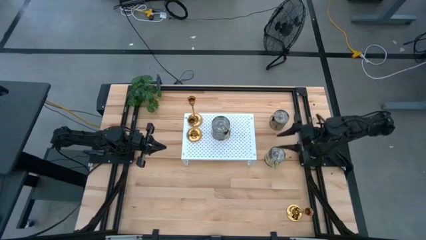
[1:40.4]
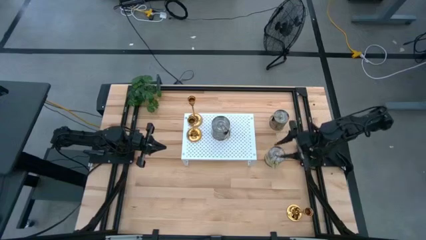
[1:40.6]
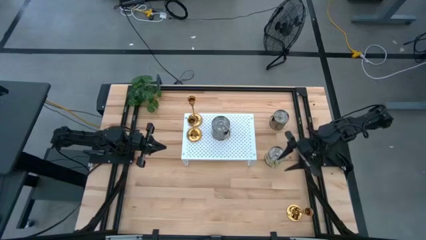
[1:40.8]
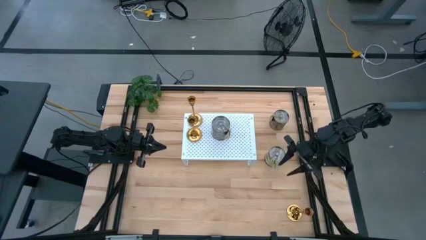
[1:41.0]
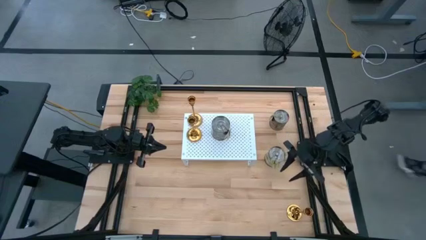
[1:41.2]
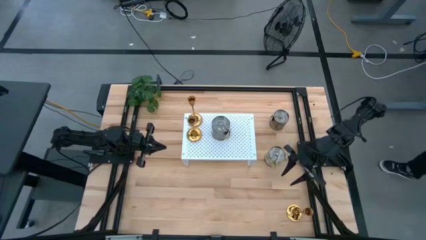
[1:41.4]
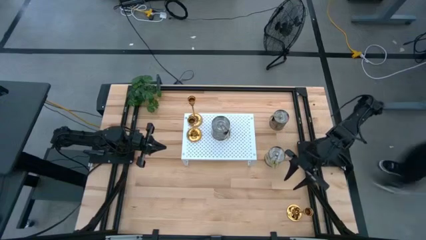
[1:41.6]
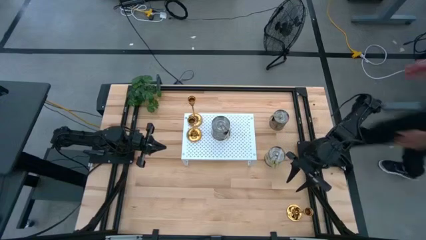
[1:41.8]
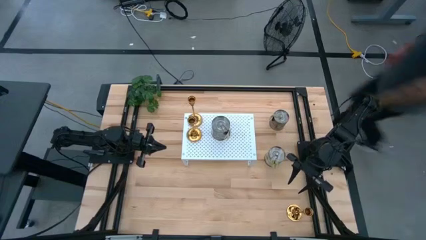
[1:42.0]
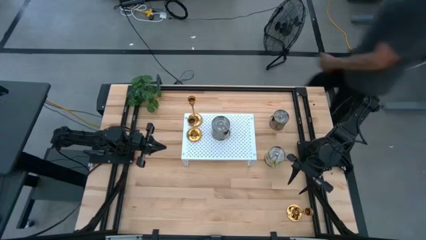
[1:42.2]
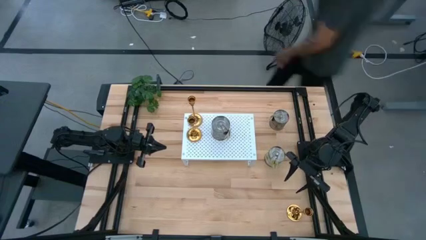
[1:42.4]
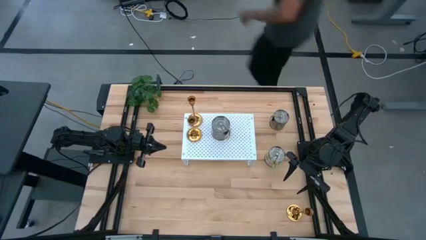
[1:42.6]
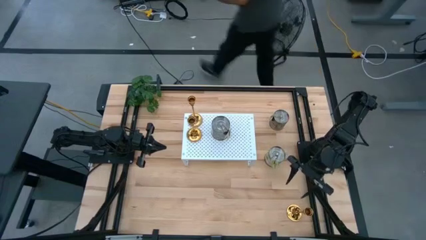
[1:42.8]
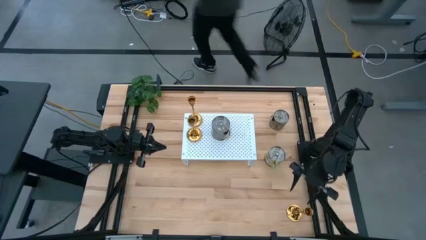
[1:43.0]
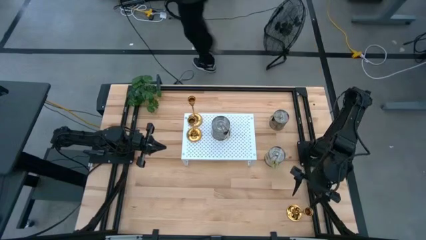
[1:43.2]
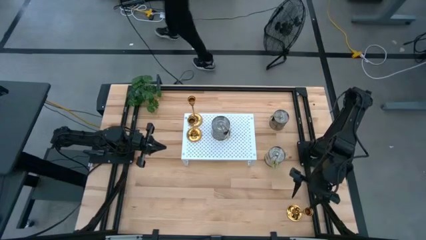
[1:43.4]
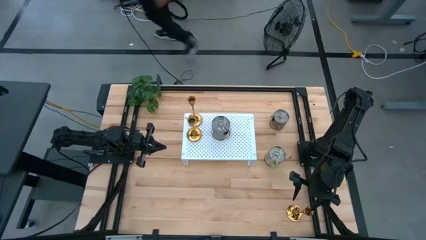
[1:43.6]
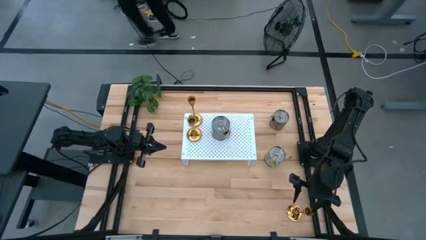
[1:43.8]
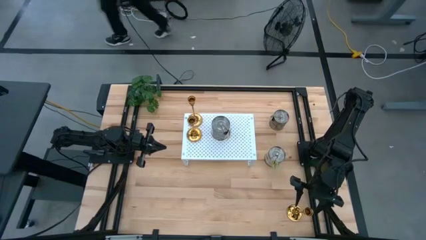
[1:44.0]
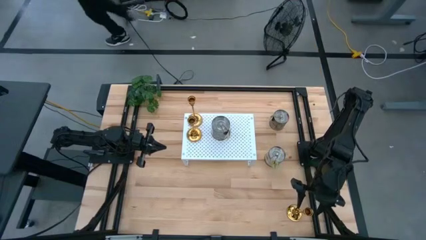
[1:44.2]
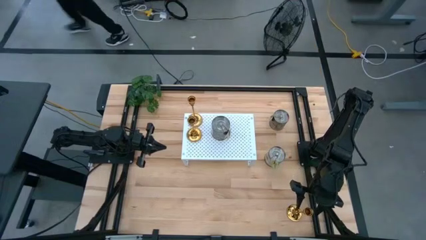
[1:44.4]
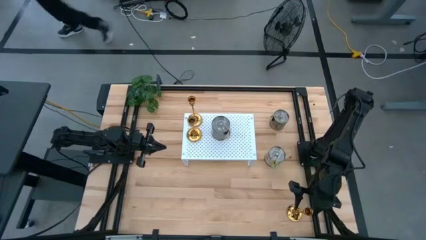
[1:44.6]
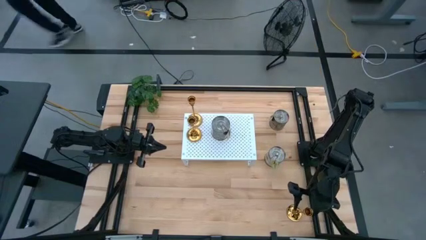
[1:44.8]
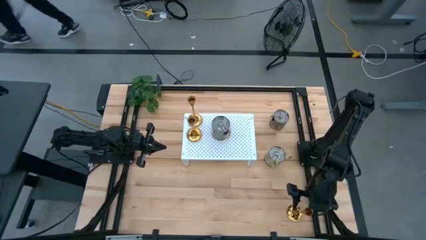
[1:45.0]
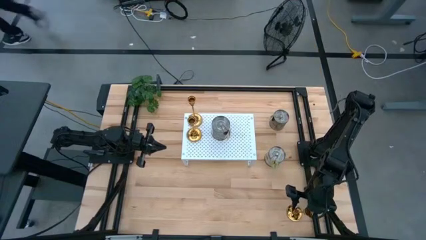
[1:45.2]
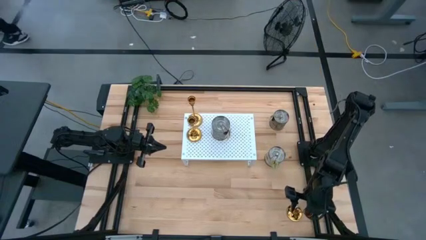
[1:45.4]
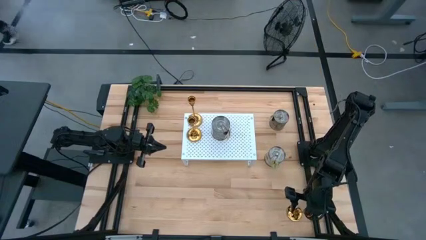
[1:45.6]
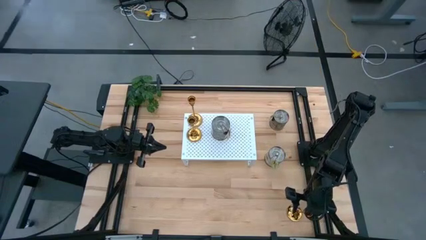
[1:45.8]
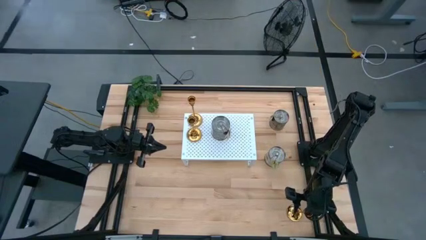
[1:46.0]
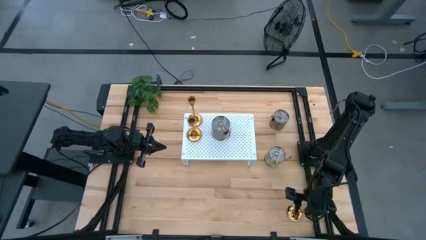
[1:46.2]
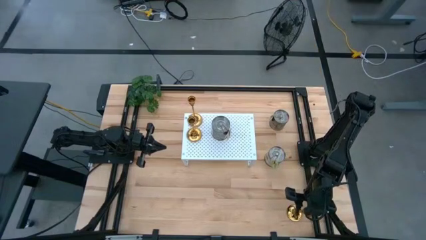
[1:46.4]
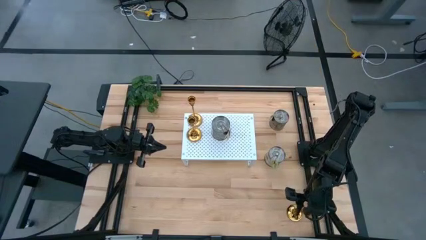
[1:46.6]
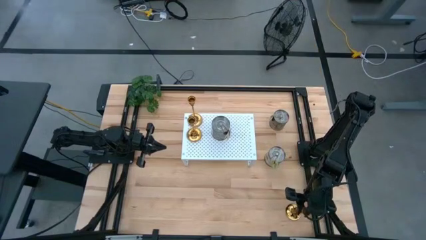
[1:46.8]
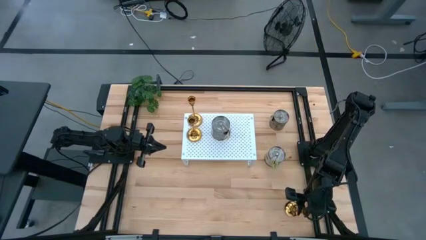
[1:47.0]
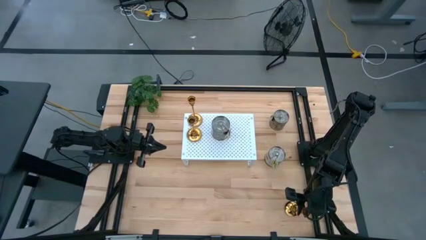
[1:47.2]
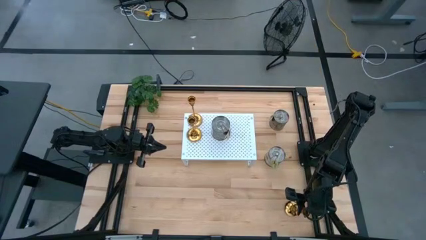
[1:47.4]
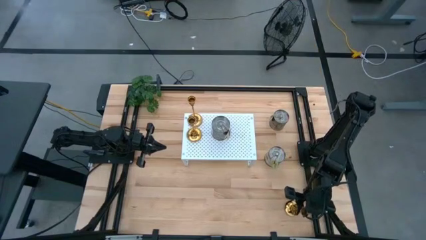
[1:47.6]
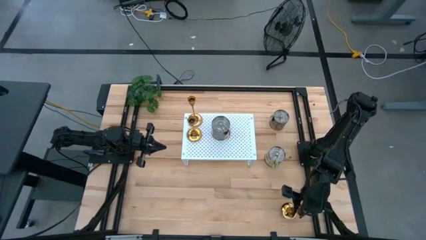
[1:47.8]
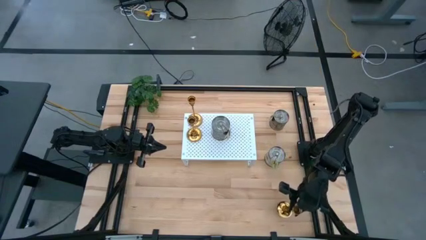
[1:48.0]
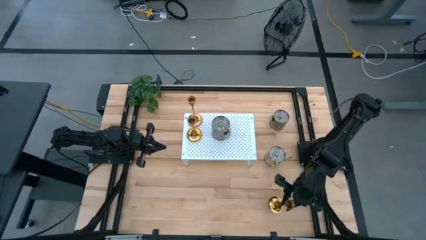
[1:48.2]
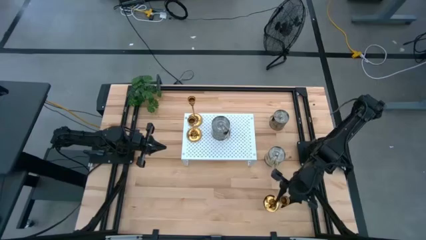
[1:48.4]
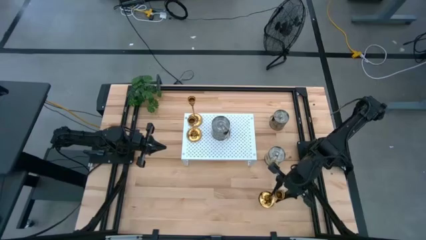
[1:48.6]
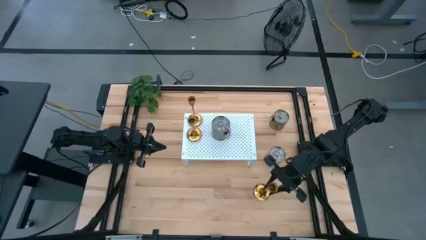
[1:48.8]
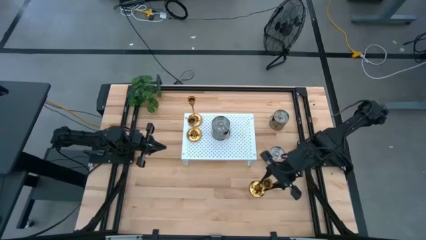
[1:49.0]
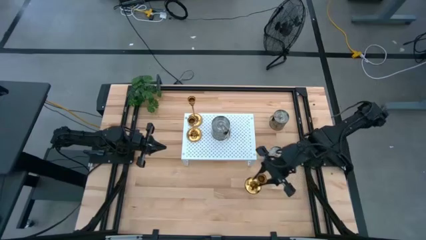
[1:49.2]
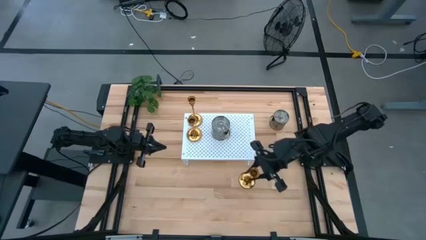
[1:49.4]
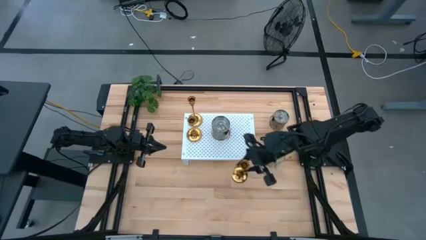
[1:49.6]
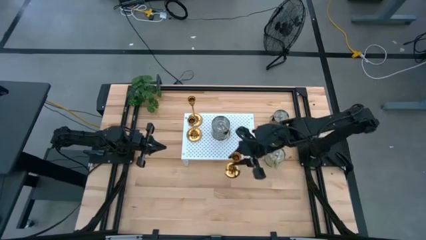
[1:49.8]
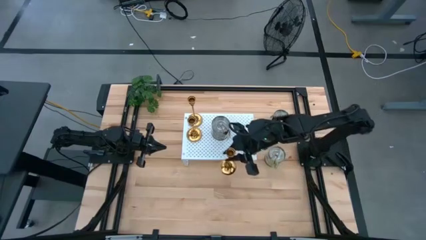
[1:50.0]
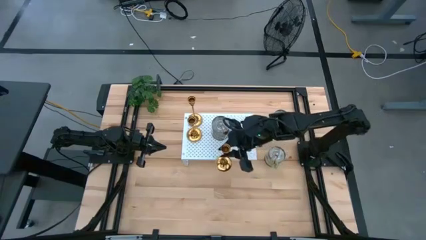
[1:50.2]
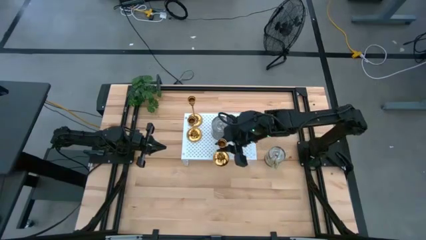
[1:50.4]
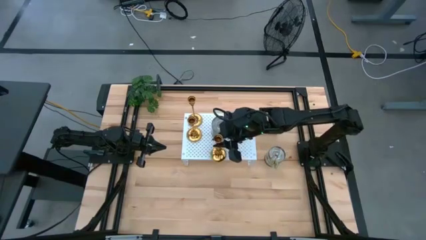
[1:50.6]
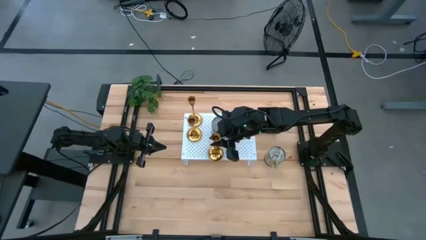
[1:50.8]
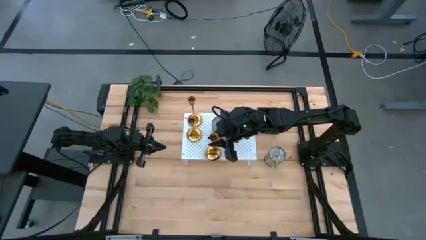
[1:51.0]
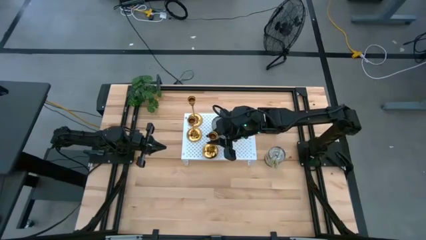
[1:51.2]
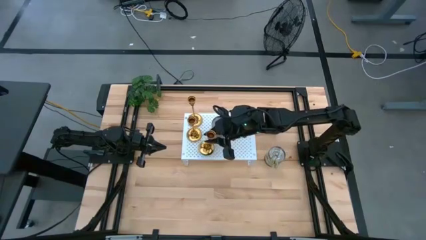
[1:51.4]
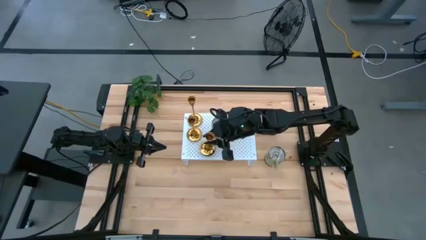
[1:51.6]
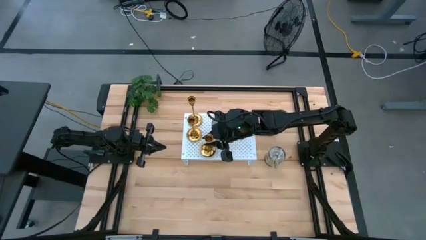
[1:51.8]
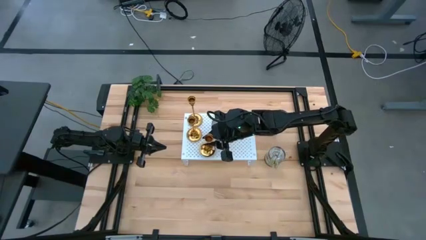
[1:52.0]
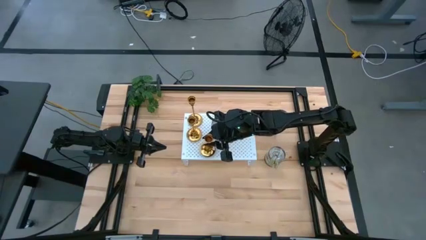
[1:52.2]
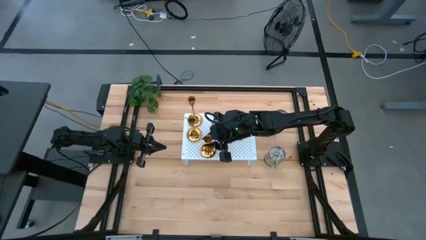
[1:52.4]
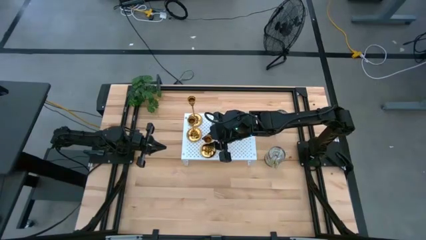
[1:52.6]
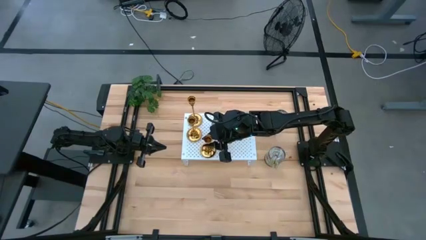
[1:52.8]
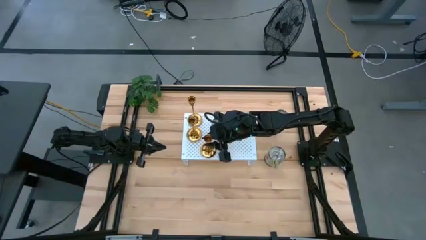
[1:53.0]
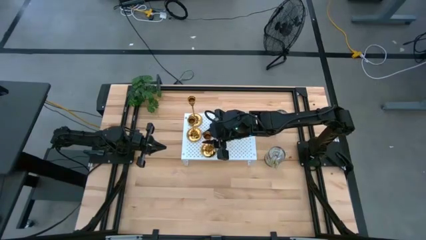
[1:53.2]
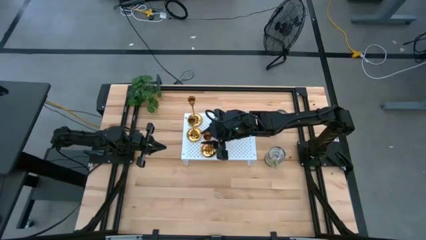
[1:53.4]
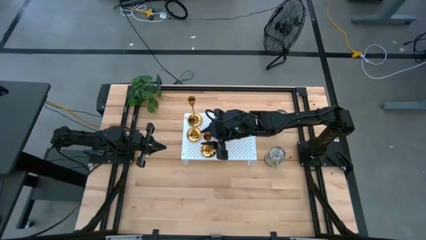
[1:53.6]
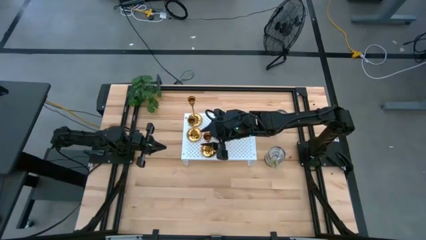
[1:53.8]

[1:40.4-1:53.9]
Task: Pick & Place candle stick holders
Put the golden candle holder on the shelf

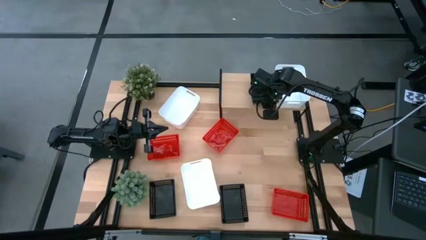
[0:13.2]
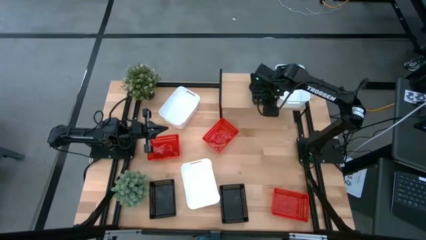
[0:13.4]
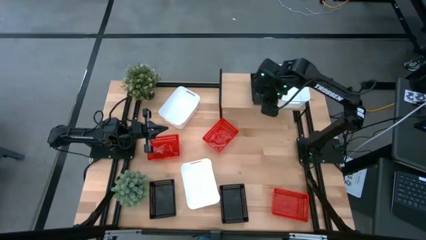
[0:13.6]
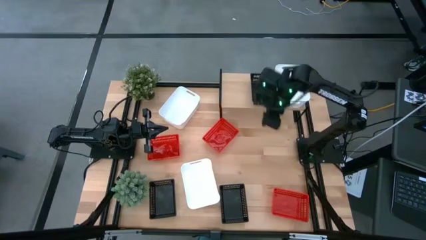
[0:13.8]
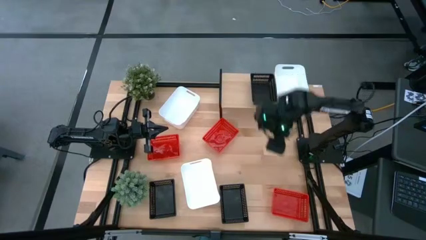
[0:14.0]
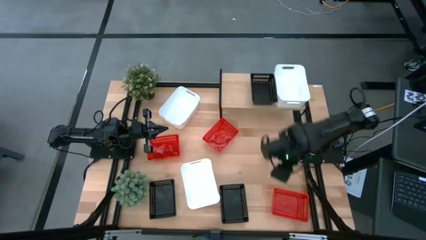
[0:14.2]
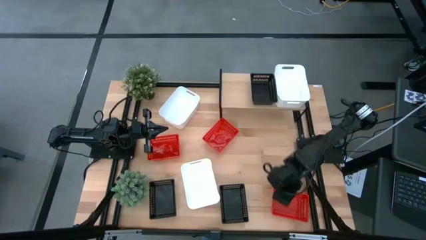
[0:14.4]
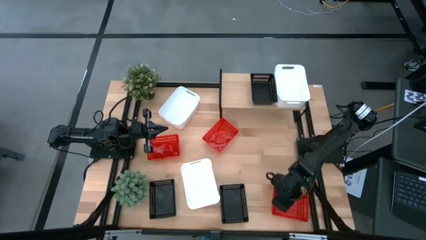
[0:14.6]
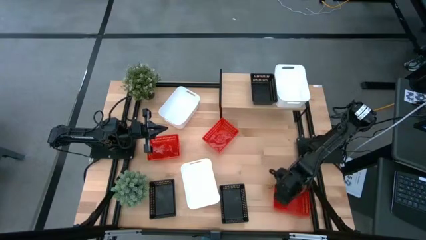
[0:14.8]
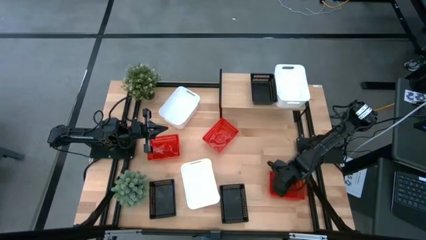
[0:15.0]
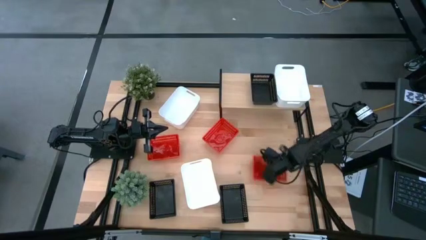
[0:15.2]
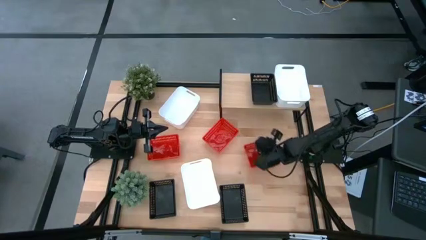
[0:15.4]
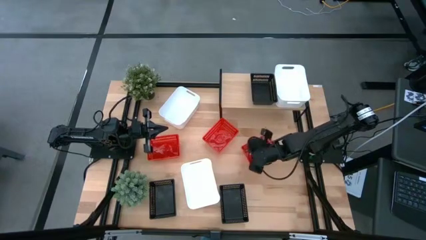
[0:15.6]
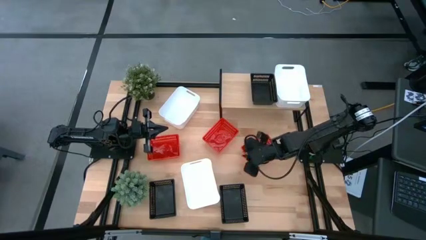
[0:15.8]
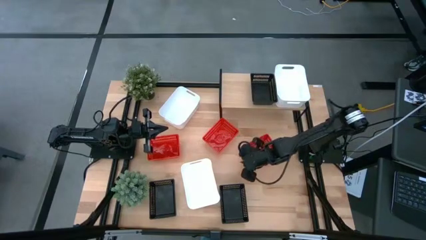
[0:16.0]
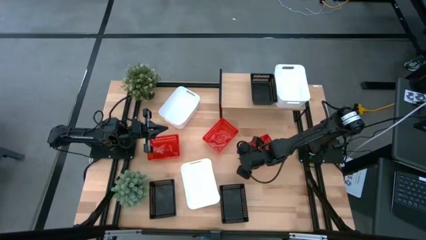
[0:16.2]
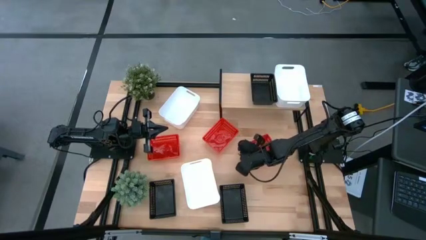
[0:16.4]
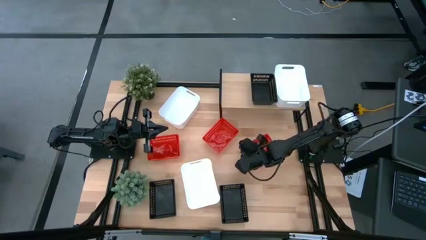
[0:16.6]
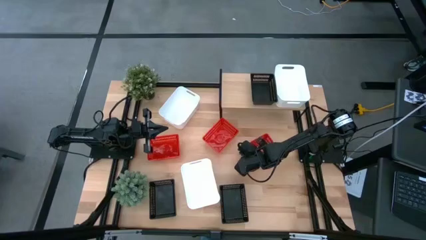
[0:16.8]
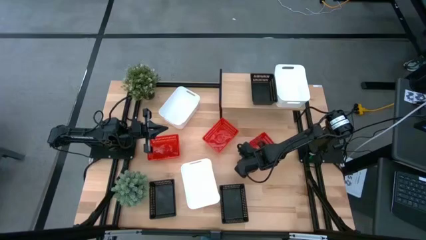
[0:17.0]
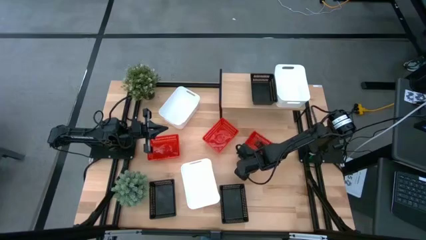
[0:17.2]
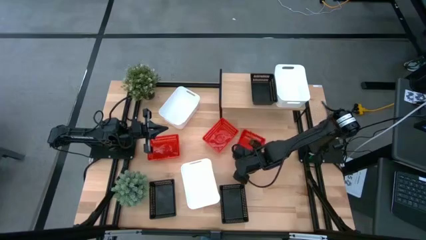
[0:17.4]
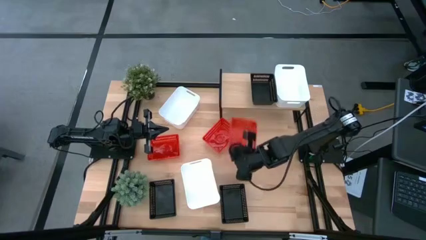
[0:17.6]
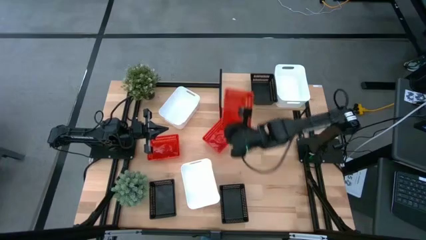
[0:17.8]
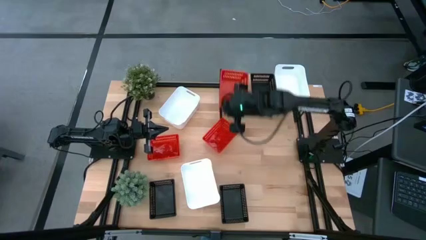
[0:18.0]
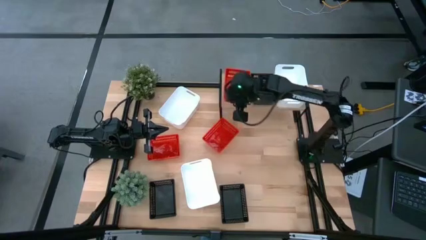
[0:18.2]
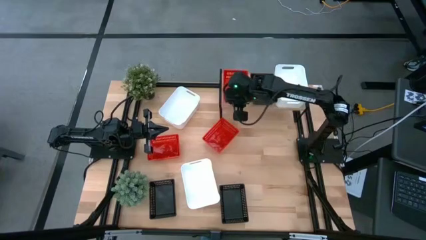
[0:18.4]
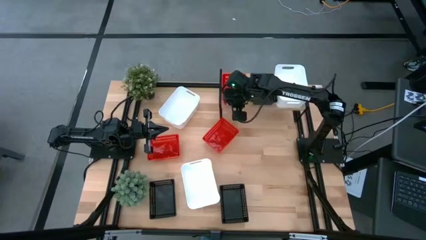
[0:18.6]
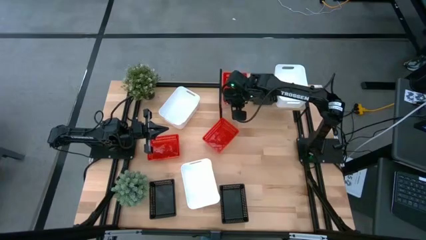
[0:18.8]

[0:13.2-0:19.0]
Task: Stack baskets on shelf by color
Put the bottom right red bin on the shelf
